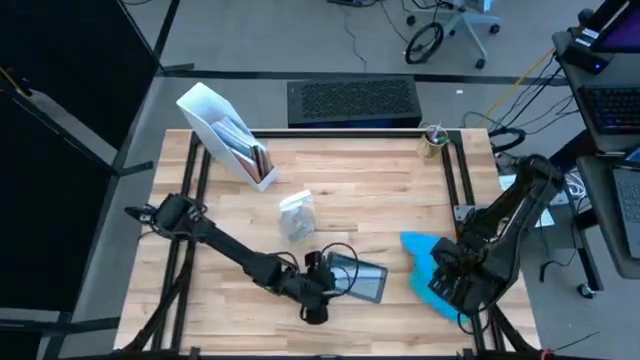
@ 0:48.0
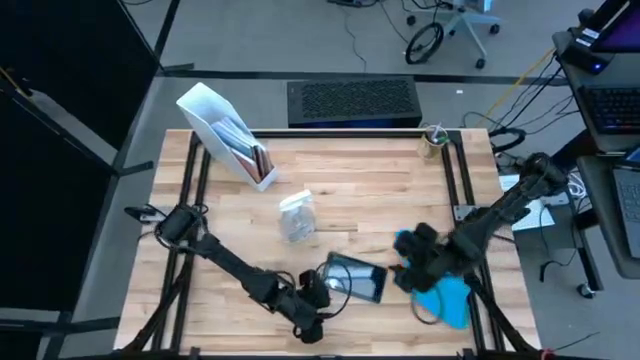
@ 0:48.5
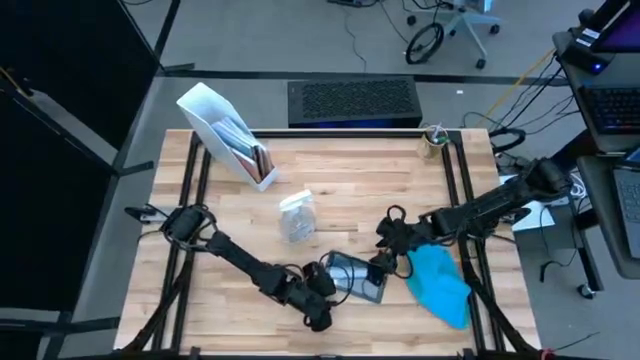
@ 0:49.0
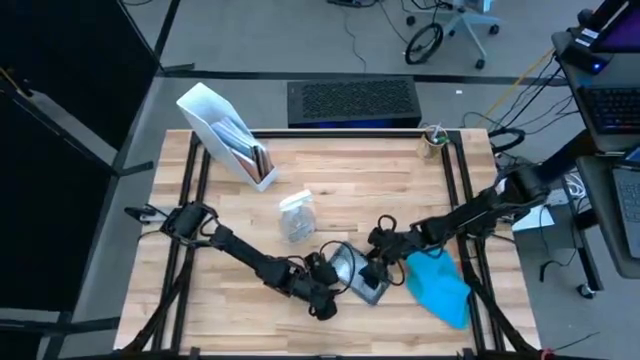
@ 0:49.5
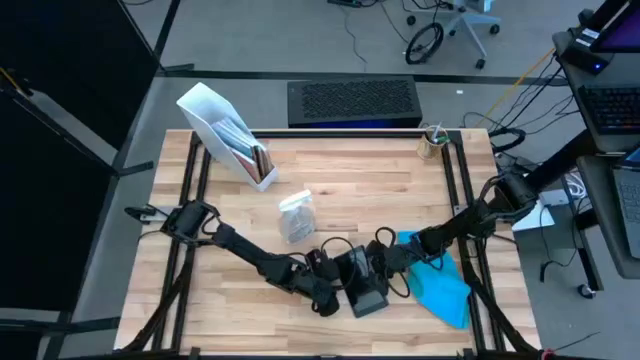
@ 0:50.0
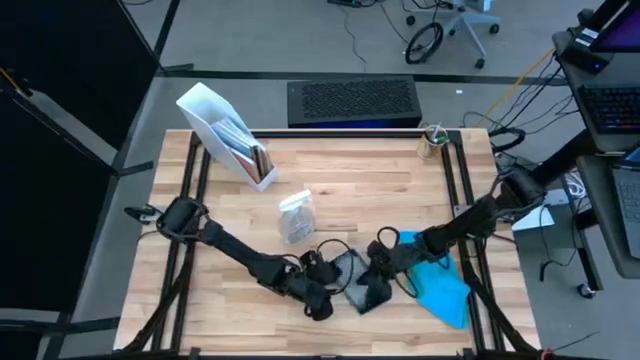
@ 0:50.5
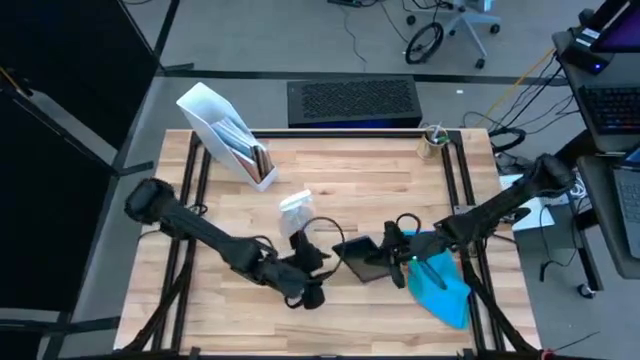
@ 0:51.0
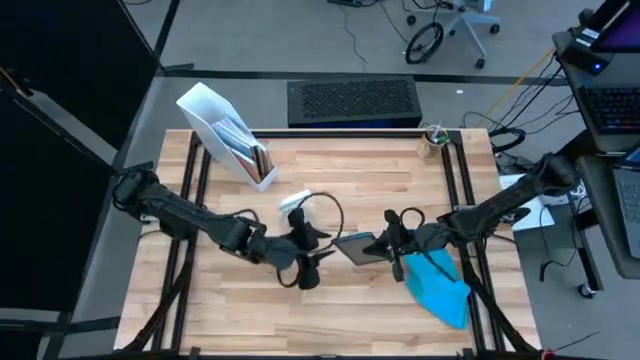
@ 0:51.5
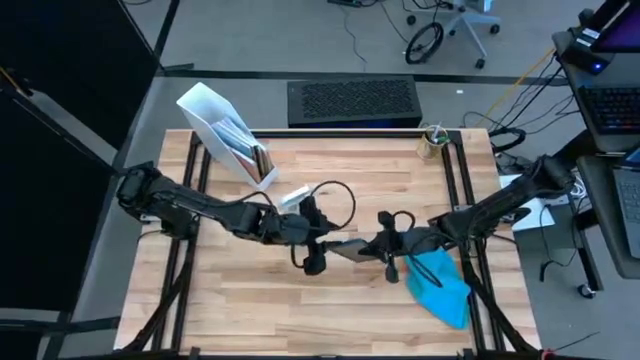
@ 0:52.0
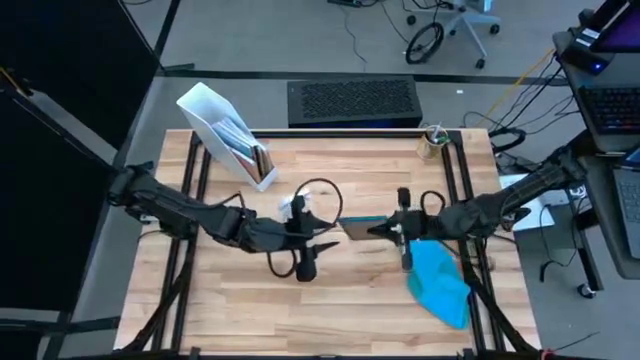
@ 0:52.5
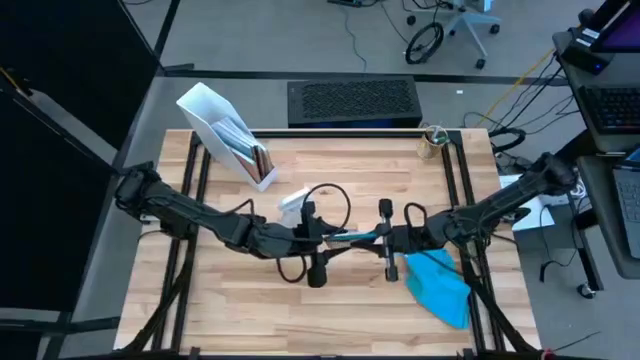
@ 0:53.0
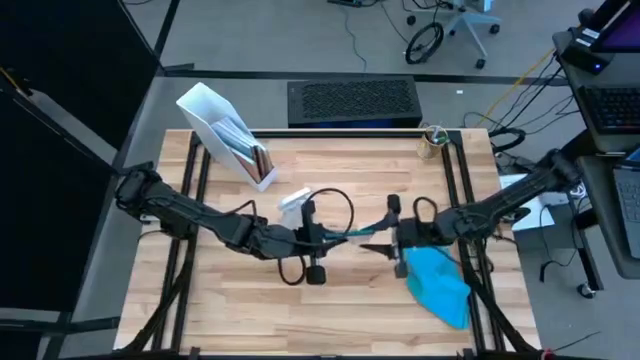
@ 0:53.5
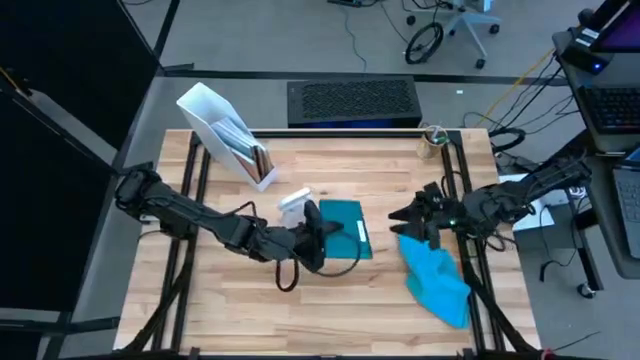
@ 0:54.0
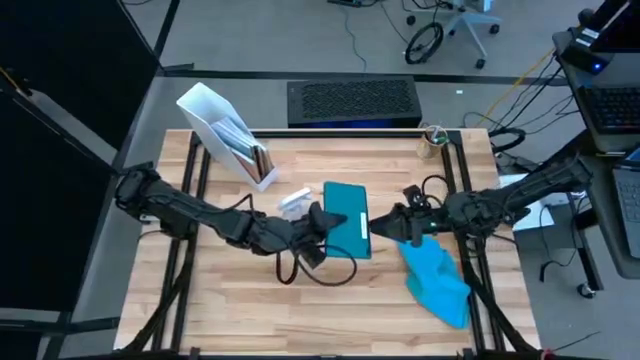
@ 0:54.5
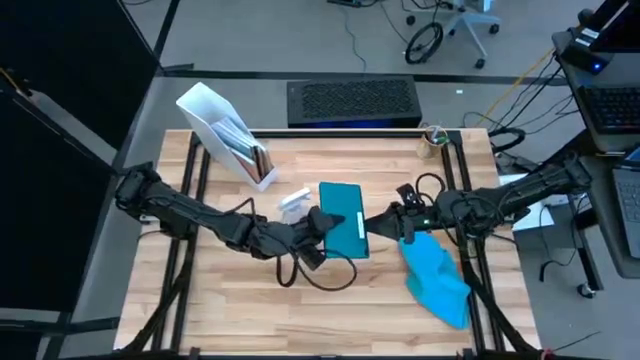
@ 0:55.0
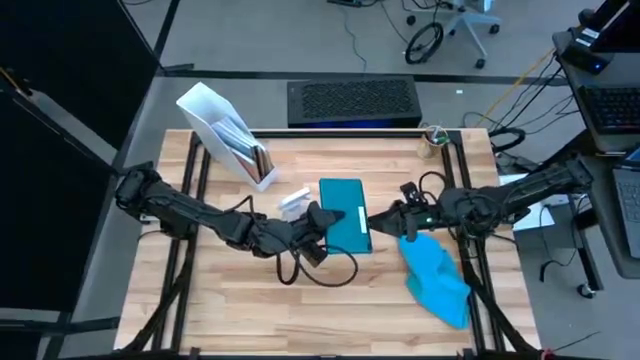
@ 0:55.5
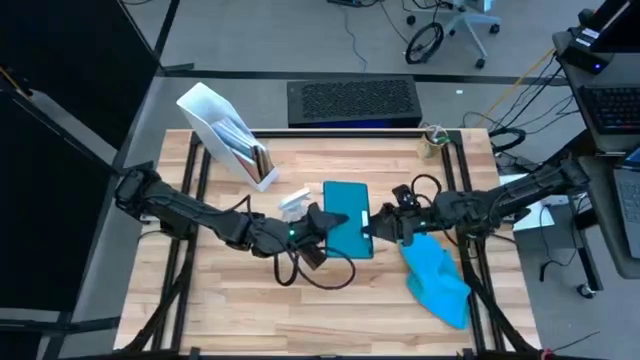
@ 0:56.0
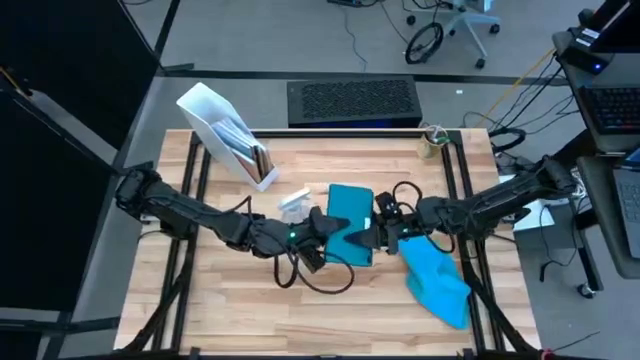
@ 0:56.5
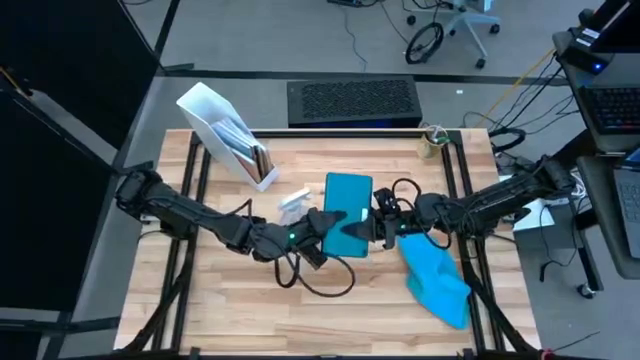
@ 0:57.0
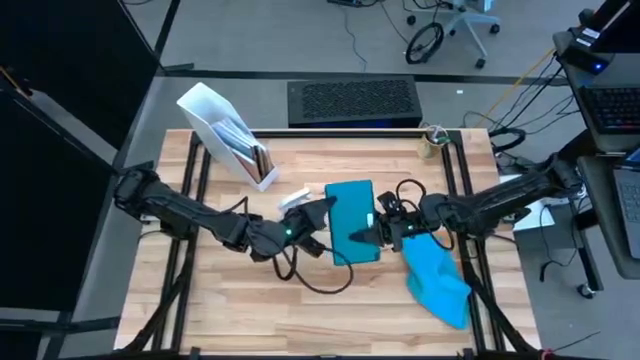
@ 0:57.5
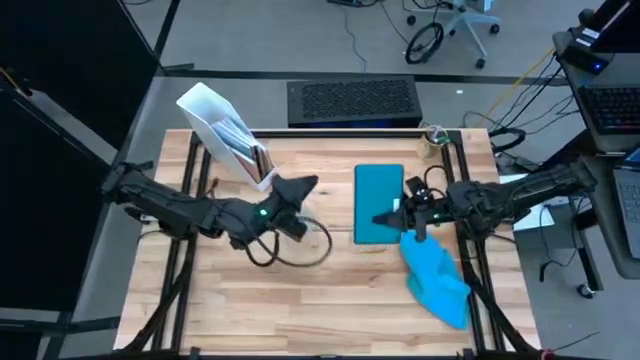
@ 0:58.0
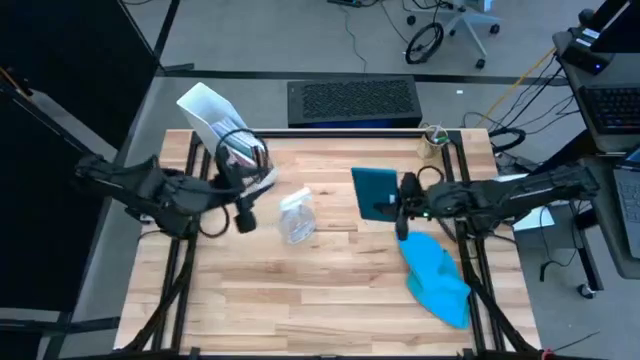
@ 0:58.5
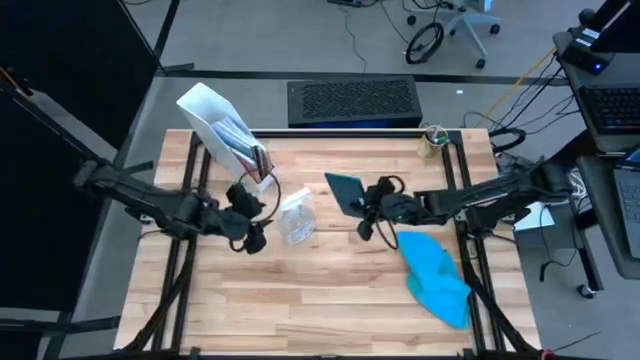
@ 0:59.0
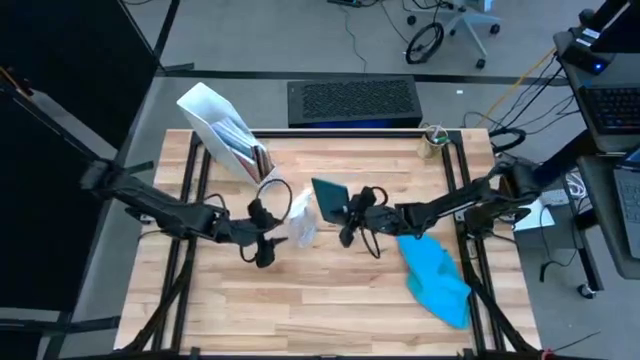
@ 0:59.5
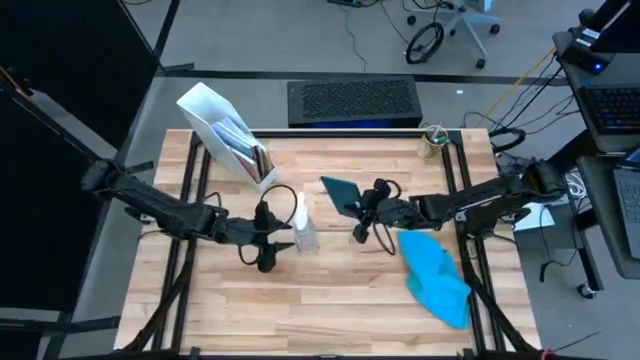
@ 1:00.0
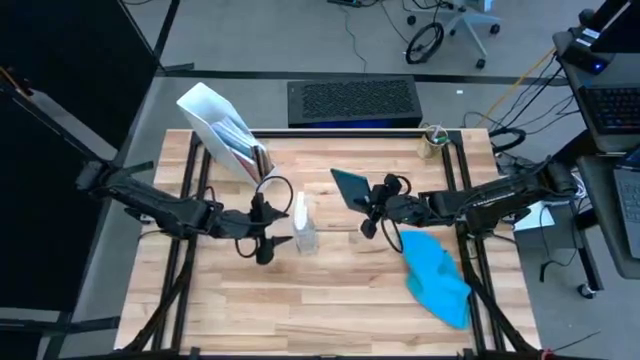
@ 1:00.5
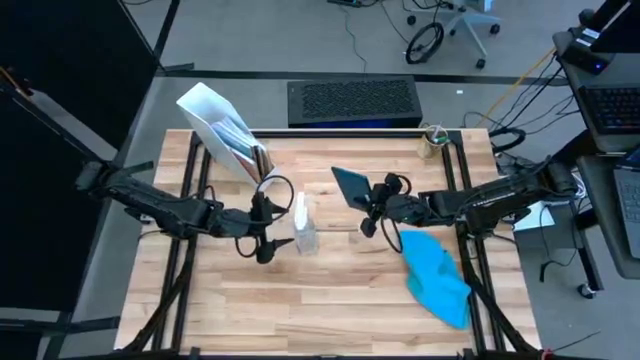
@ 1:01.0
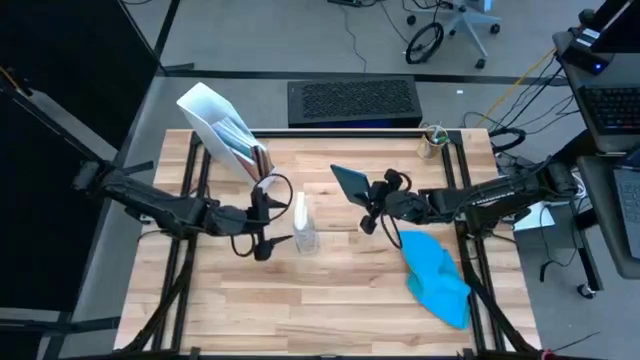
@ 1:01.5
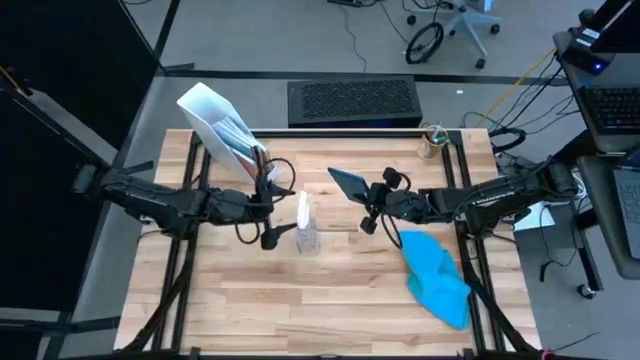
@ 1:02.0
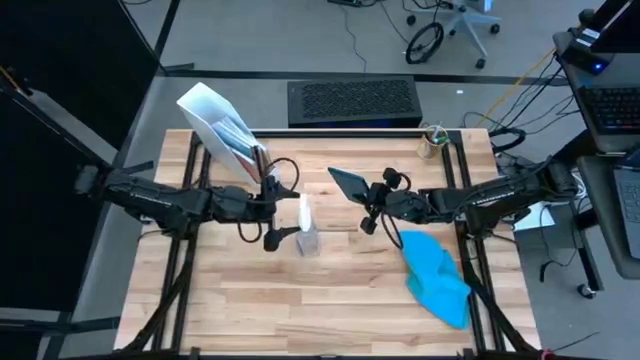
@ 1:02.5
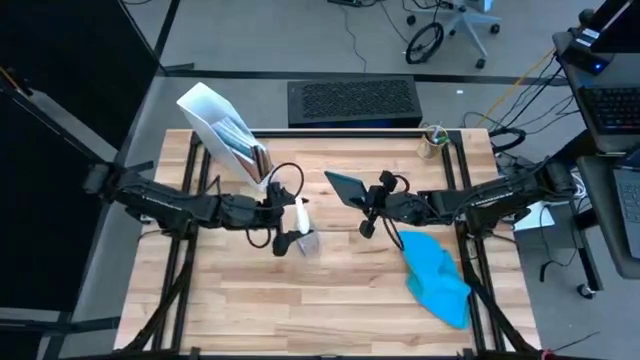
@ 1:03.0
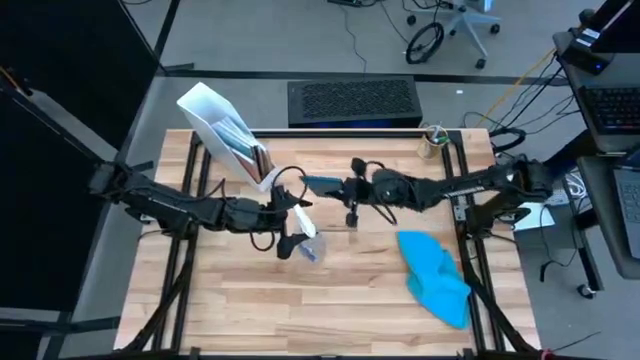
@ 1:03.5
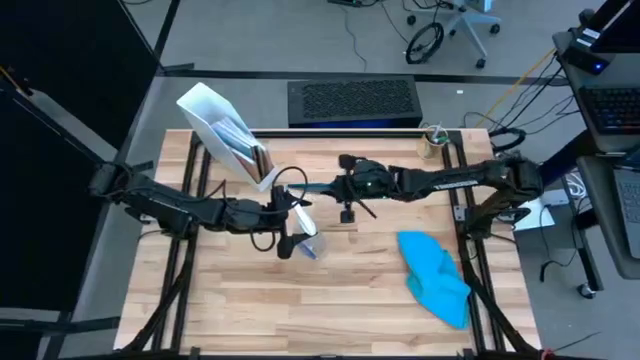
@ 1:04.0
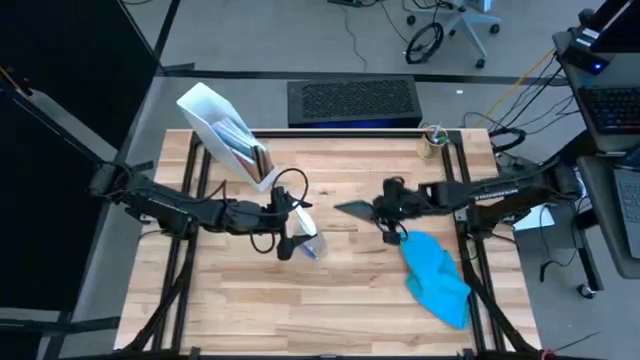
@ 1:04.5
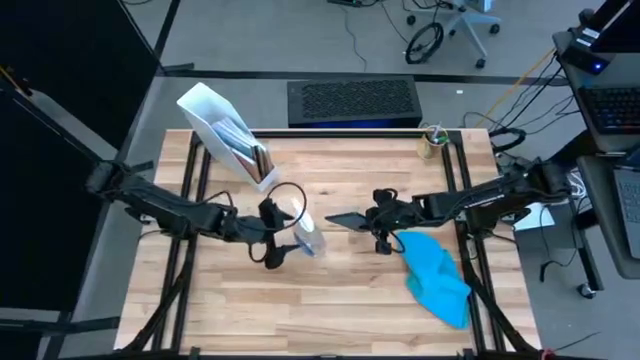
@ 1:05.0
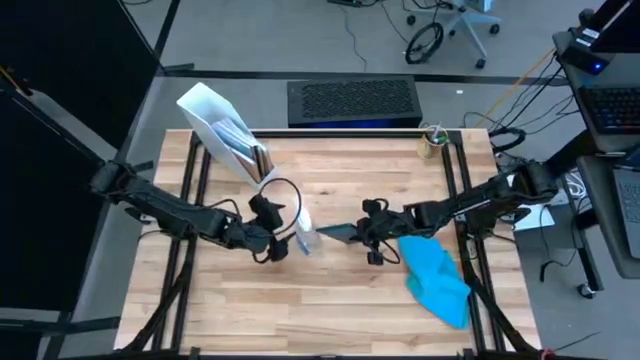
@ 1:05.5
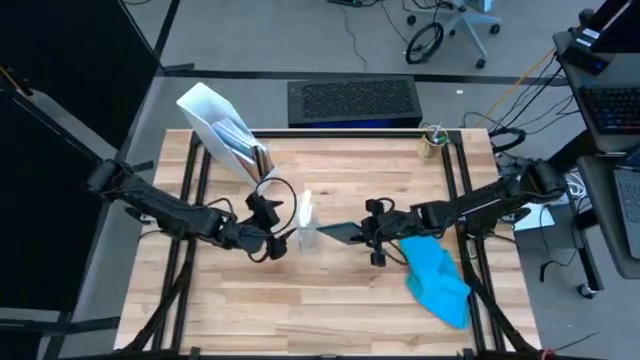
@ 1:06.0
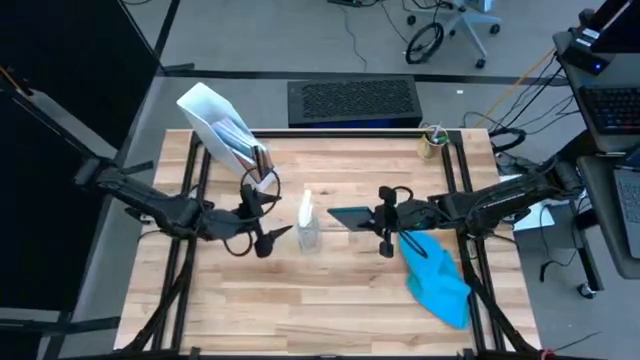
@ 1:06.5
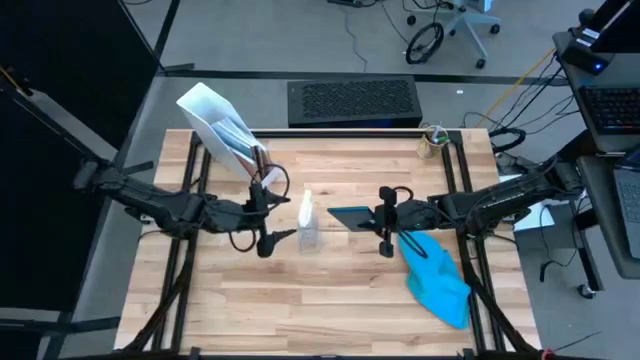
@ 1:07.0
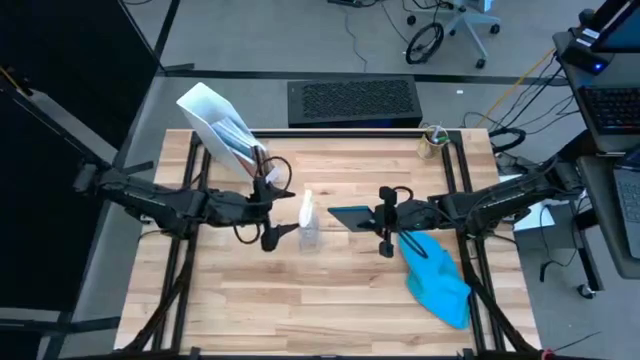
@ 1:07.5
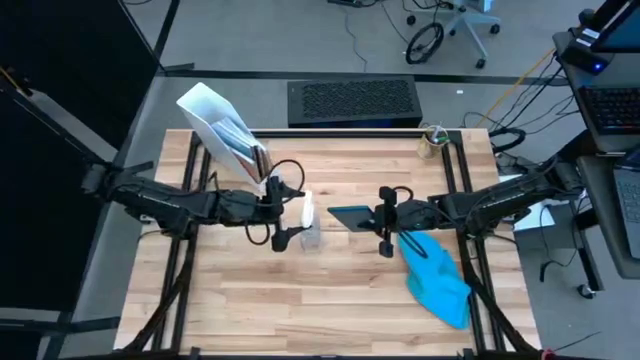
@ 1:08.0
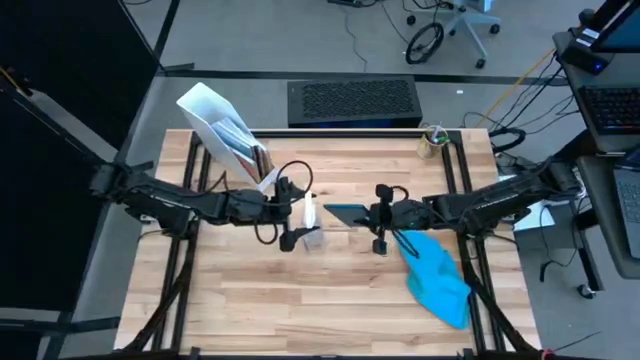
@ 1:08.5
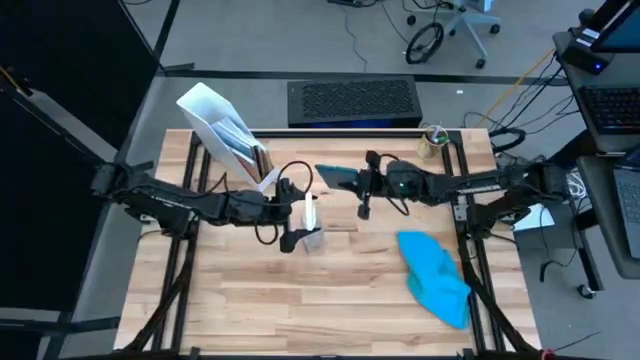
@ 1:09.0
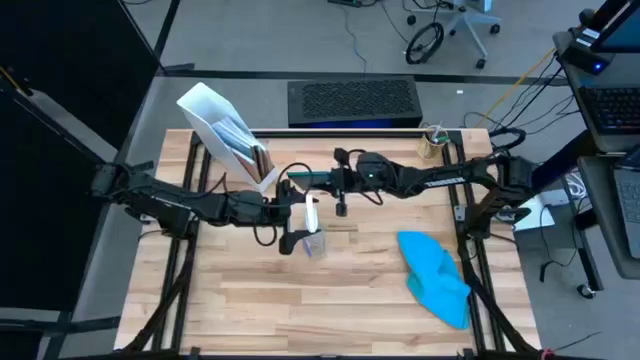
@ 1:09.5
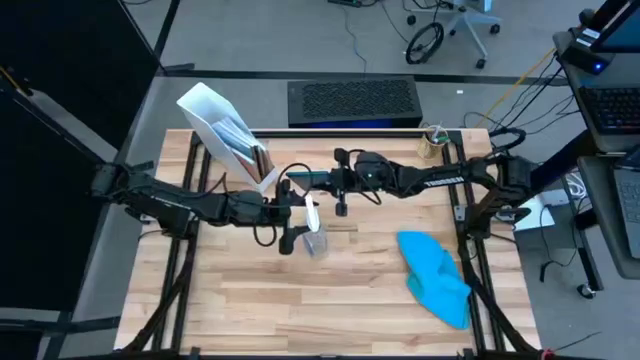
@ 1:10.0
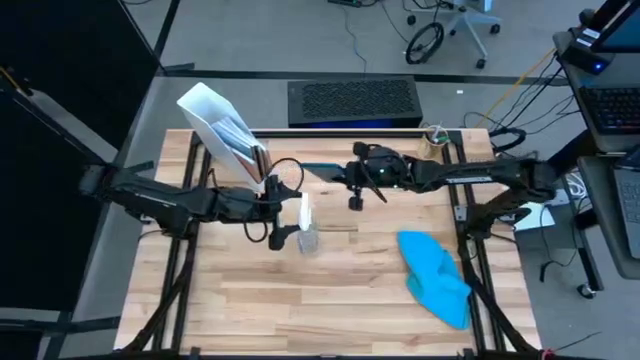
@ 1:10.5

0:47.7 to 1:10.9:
Task: Apply microfiber cloth
Spray the back of the blue tablet with the spray bottle
